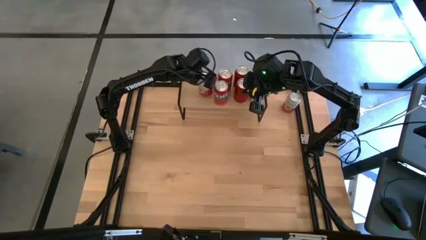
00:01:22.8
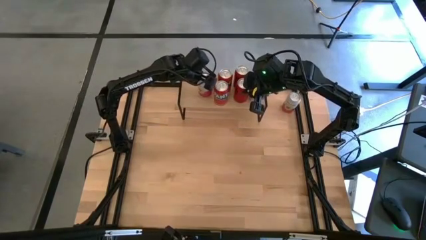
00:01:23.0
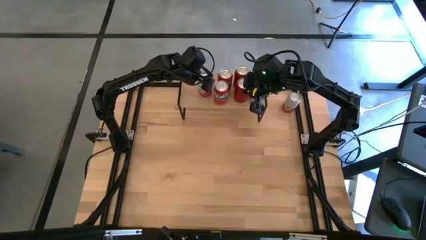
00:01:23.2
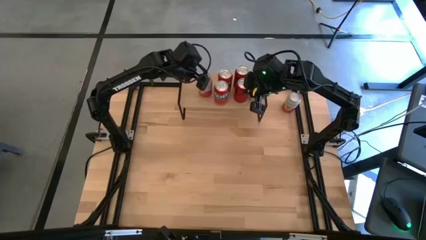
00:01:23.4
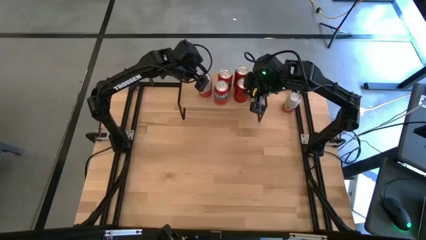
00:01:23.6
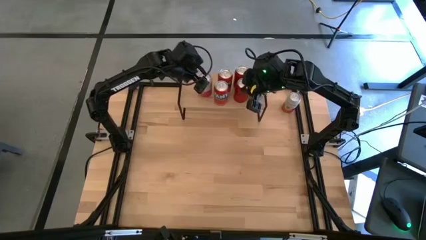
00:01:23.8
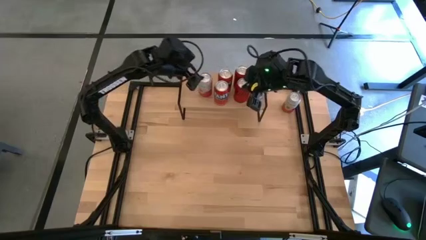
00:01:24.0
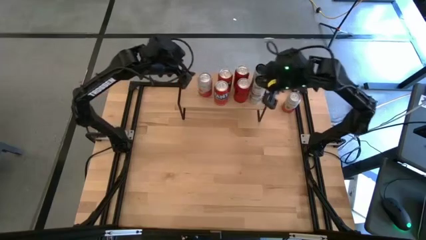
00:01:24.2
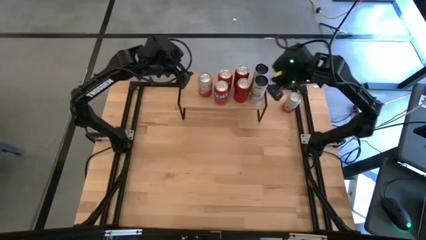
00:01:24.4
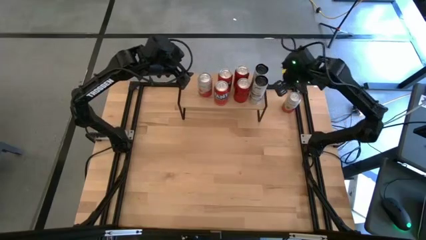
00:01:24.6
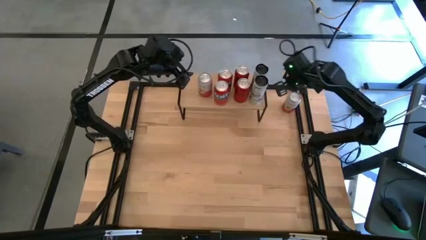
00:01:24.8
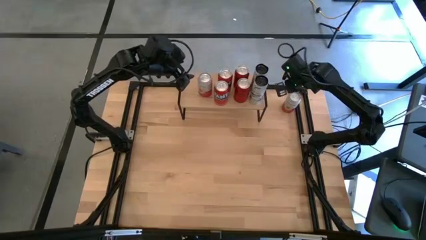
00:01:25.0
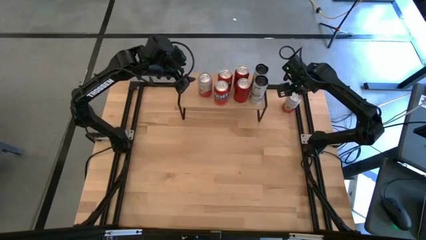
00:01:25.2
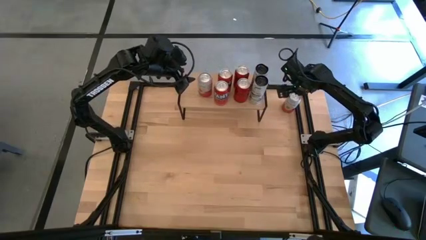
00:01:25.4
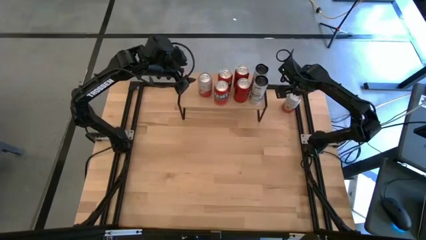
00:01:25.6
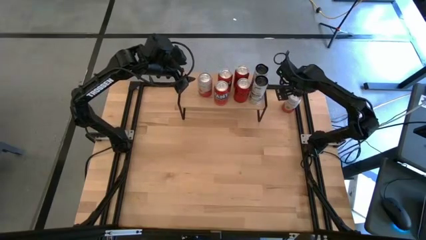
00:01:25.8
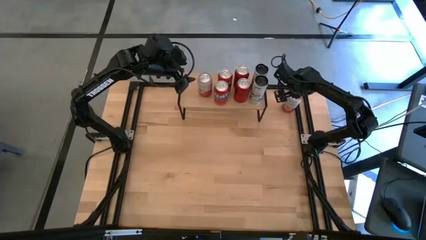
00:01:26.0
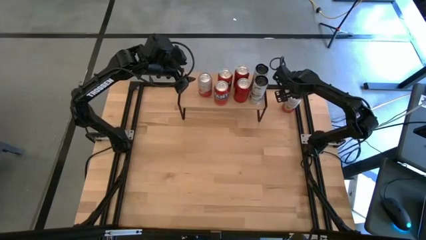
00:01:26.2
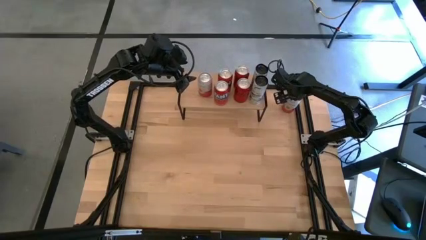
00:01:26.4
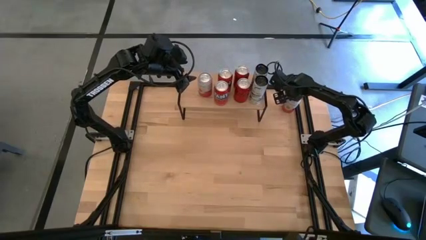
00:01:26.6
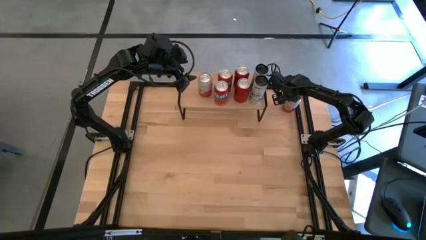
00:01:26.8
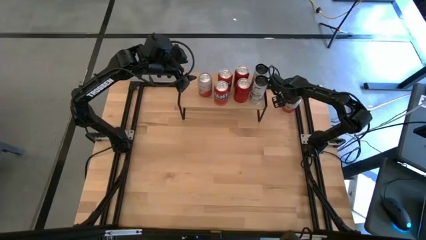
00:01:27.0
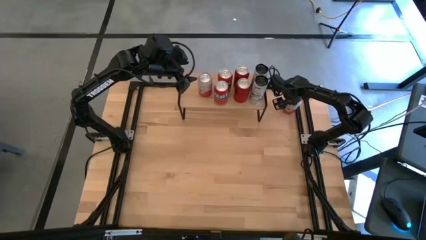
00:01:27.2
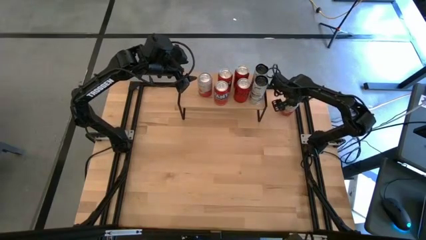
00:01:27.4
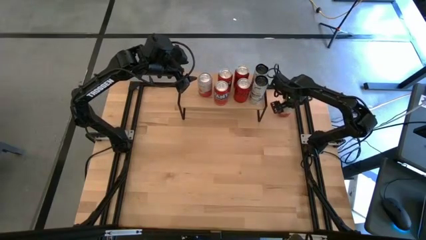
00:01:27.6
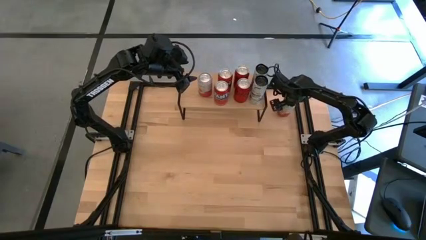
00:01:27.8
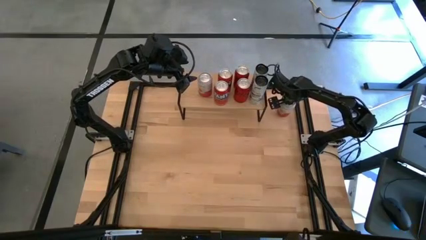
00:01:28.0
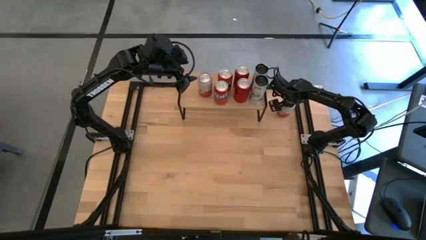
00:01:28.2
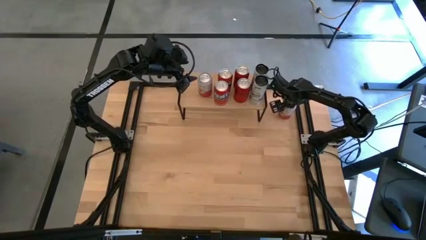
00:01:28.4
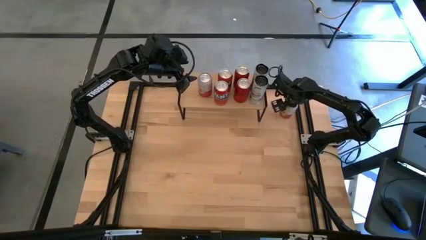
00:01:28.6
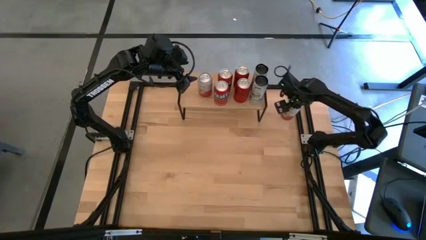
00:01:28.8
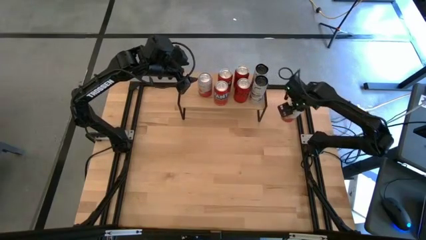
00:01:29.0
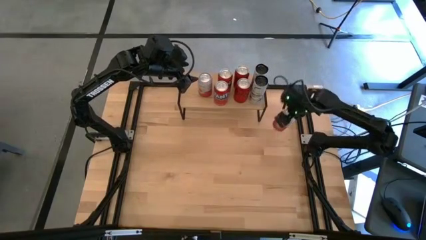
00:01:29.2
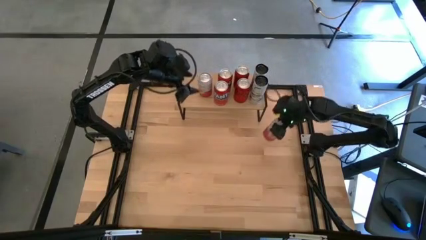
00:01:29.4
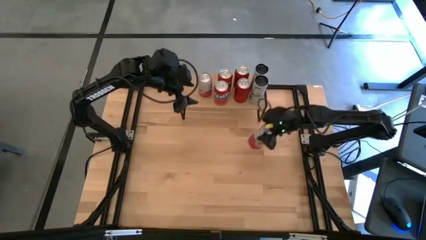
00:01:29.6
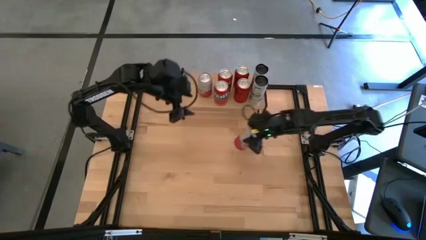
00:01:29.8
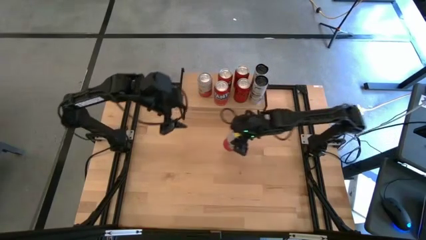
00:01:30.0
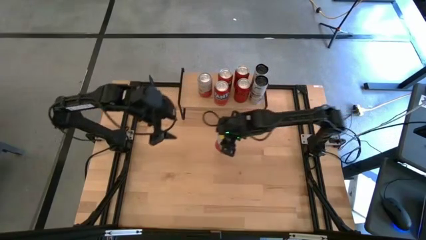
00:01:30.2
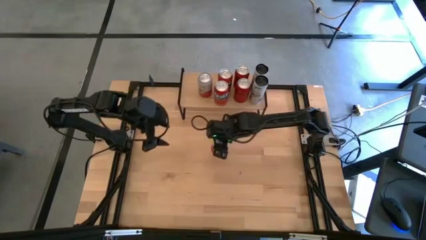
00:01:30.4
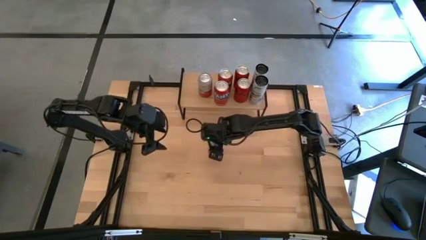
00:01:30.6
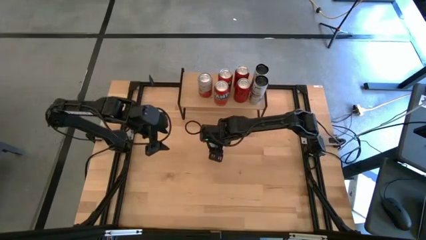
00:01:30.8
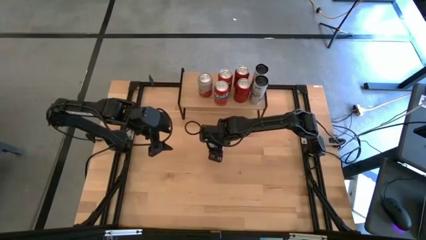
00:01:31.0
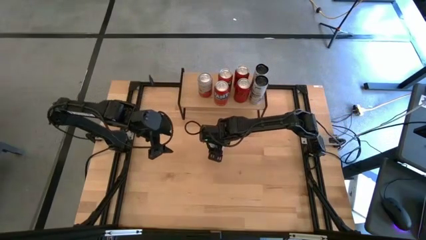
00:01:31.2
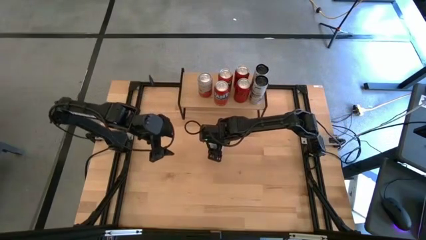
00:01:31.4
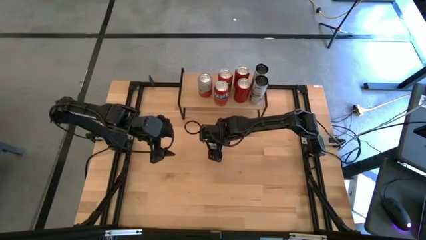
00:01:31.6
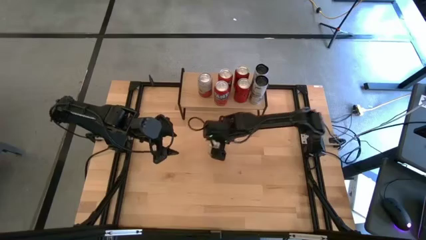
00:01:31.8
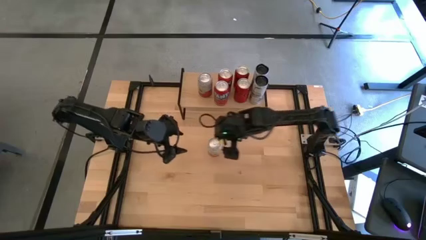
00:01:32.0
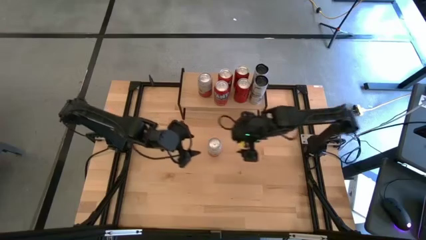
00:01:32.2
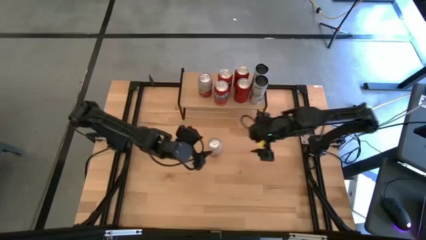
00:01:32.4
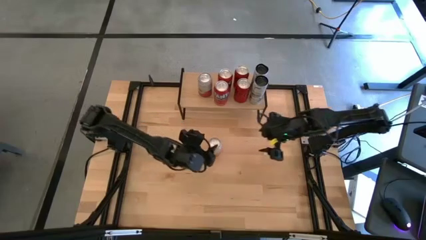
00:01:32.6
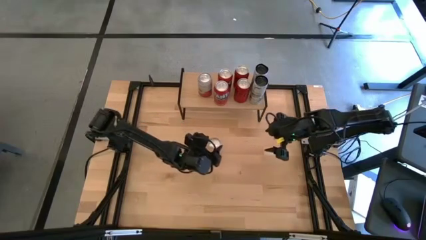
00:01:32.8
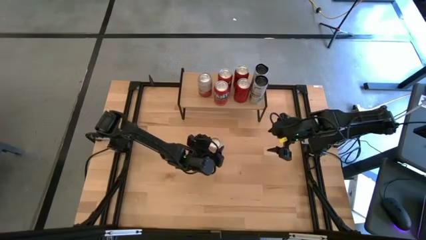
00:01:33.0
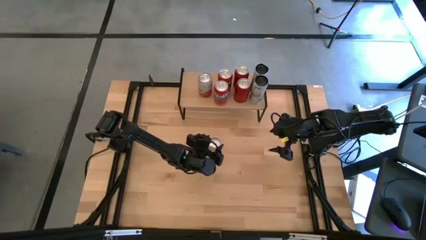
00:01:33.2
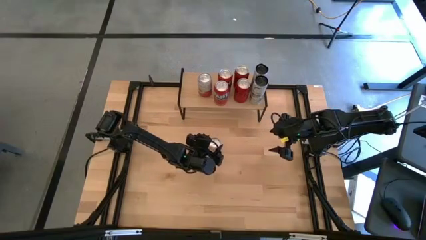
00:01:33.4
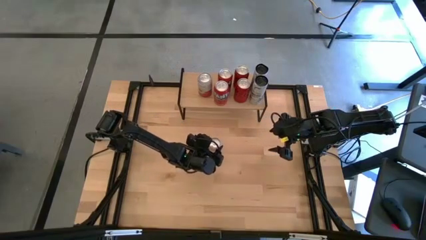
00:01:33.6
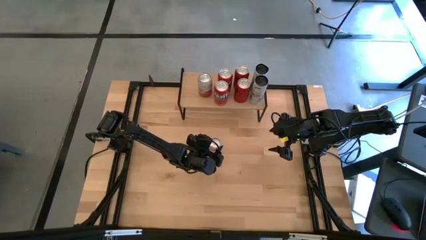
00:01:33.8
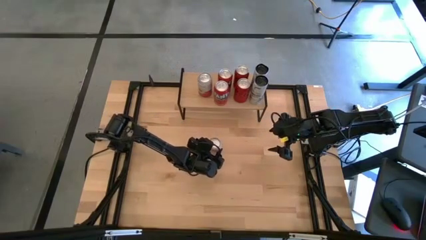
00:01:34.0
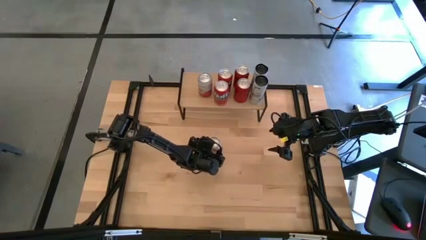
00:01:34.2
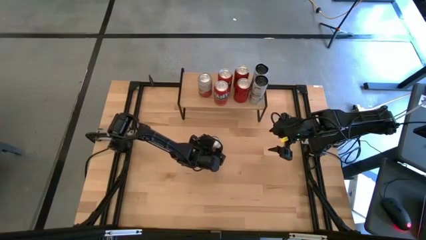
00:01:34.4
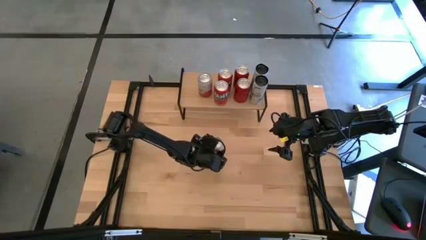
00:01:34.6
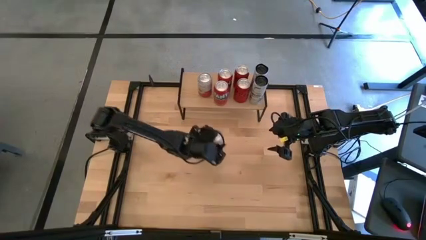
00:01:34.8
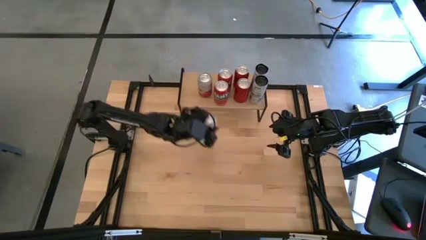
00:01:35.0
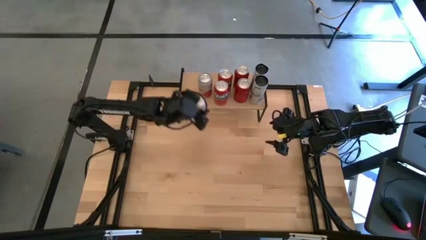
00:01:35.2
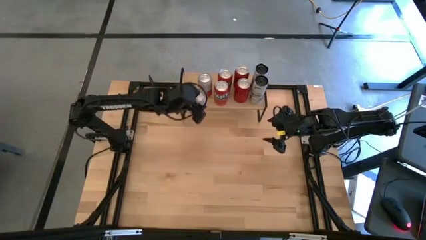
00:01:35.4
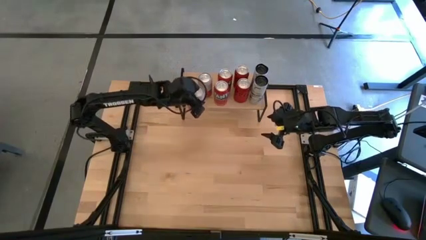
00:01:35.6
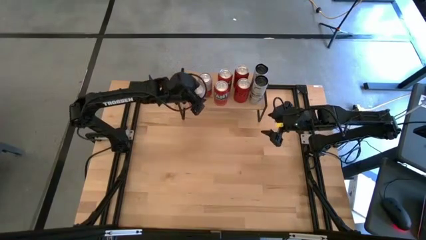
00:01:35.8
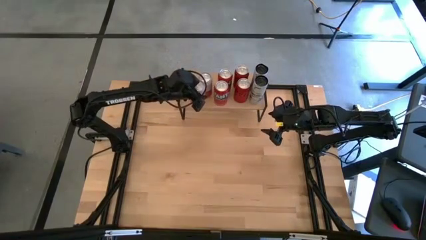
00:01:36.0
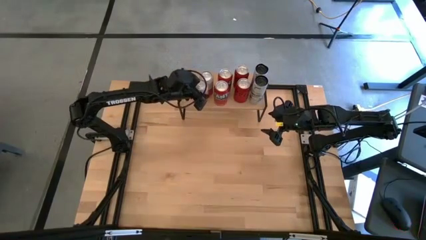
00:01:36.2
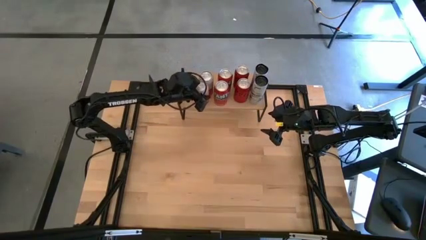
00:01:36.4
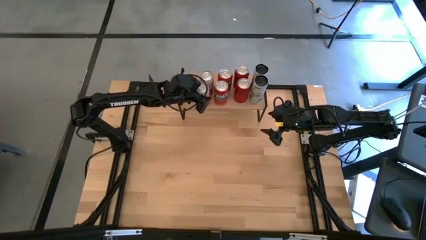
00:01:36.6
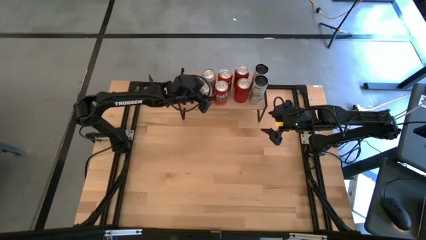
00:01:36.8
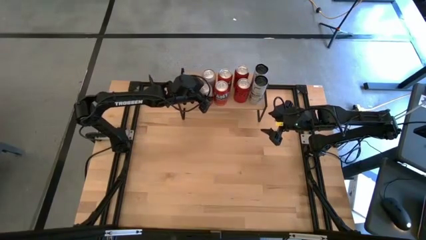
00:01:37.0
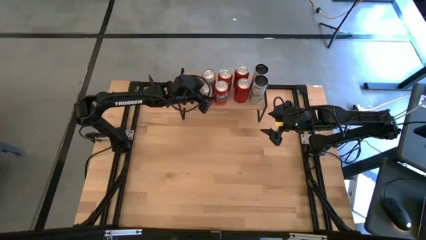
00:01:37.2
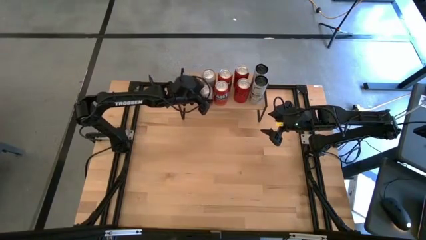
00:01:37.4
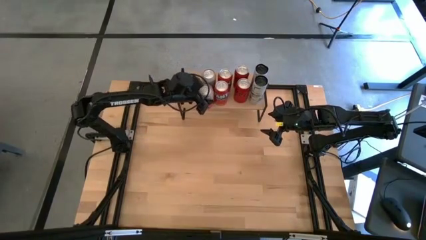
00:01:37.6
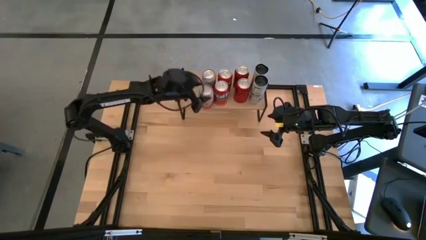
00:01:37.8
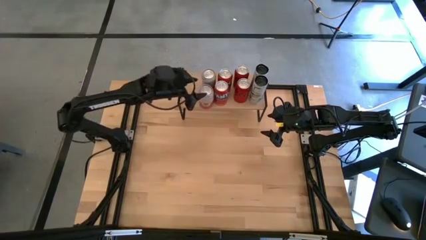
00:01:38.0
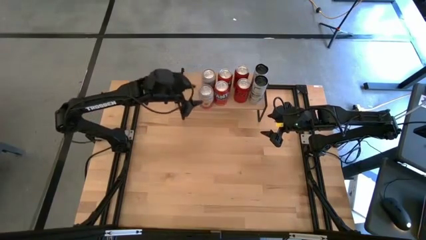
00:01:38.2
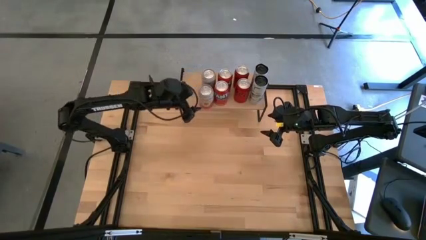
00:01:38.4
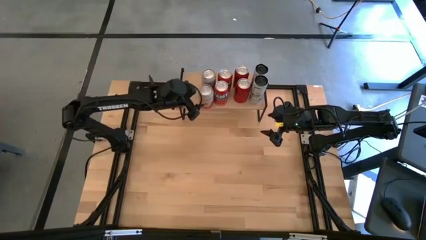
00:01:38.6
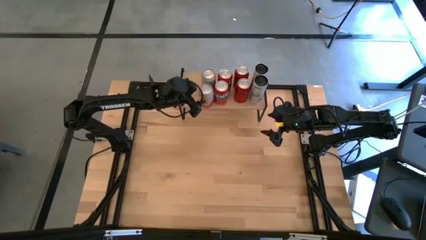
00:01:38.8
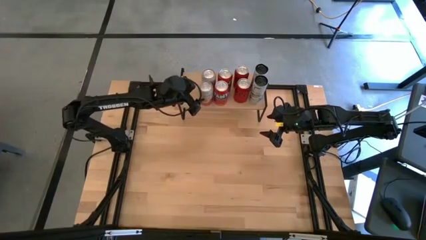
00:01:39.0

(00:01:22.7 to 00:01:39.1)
Task: Place canned beverage on shelf
Put the pink-white soda can on the shelf aligned with the other pink-white soda can
